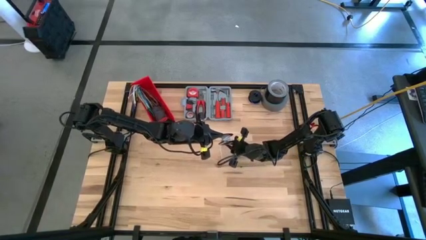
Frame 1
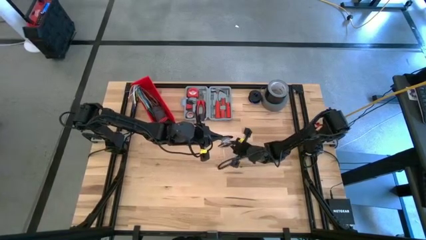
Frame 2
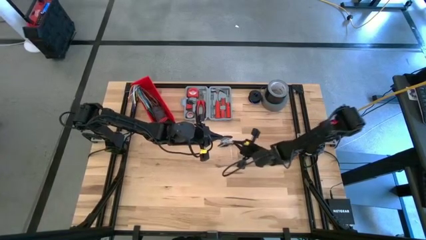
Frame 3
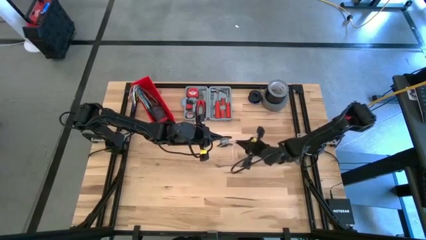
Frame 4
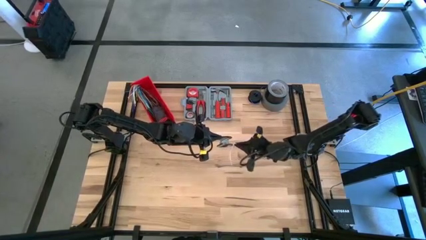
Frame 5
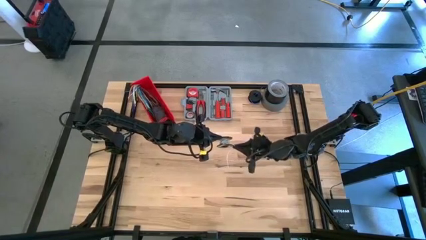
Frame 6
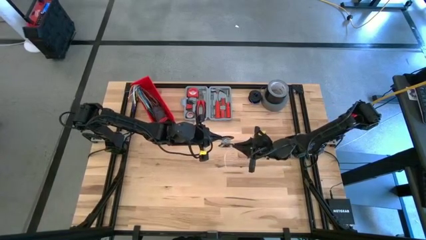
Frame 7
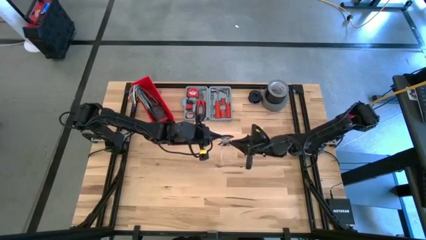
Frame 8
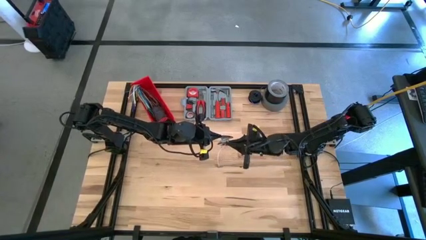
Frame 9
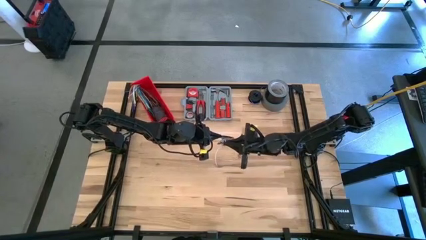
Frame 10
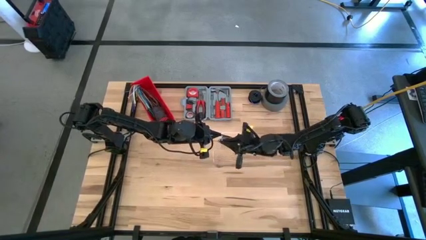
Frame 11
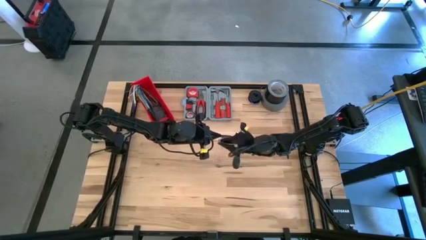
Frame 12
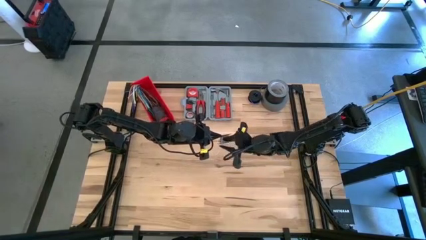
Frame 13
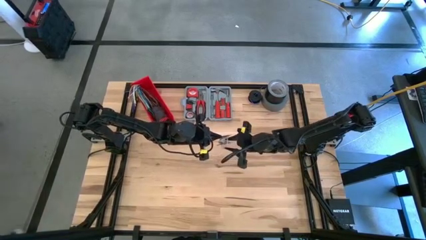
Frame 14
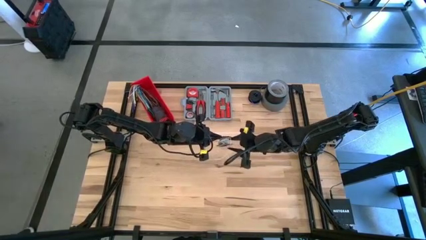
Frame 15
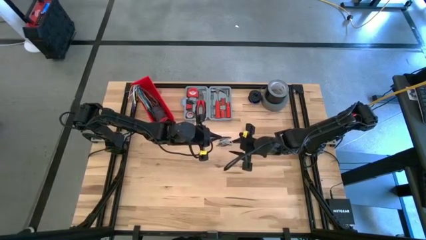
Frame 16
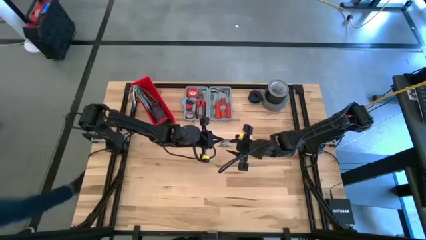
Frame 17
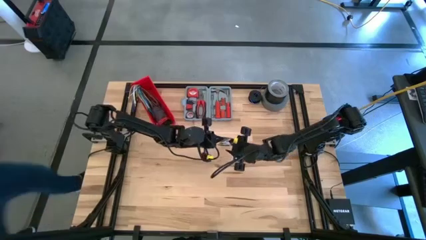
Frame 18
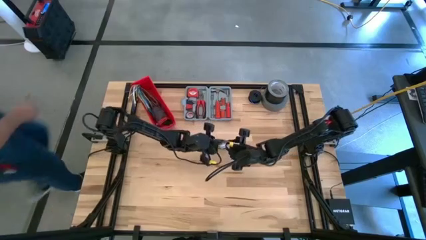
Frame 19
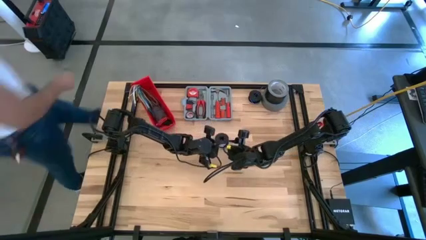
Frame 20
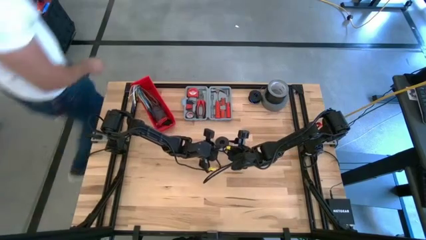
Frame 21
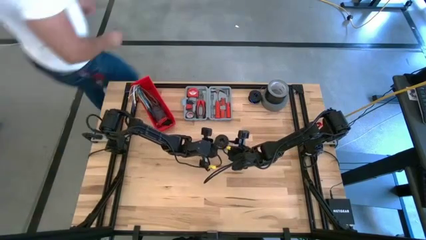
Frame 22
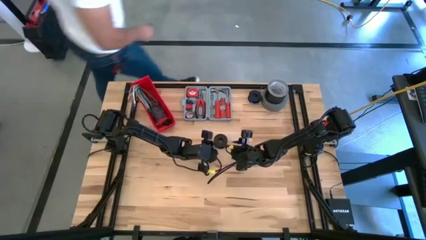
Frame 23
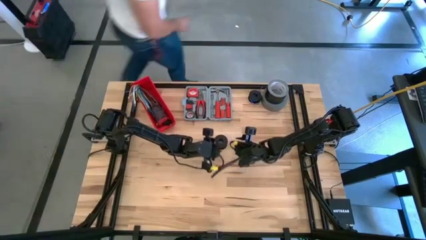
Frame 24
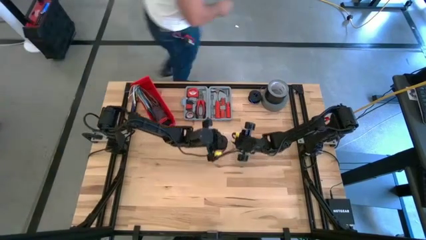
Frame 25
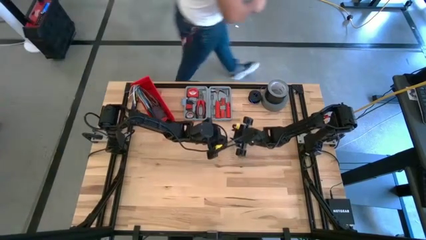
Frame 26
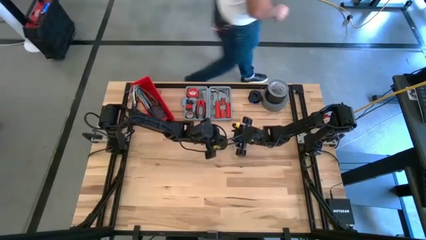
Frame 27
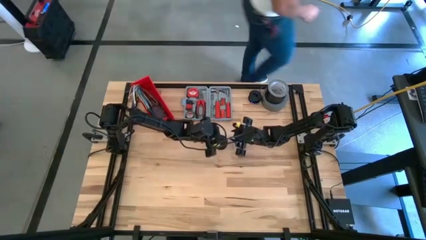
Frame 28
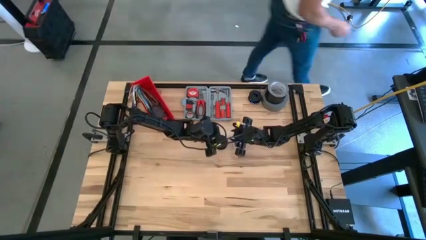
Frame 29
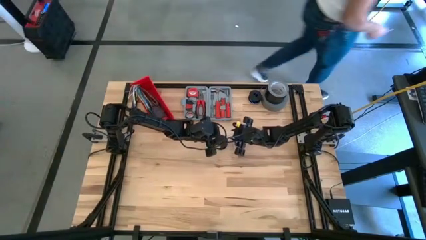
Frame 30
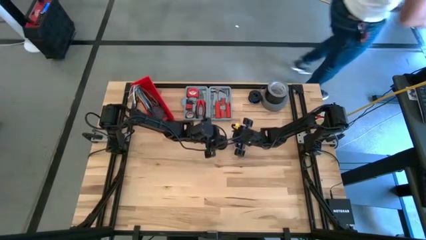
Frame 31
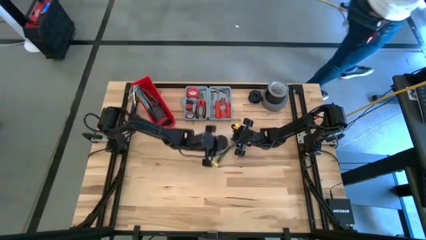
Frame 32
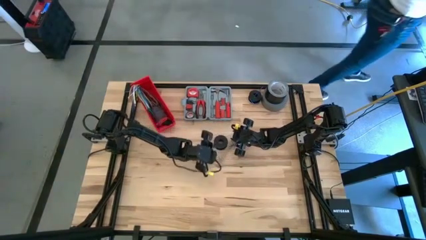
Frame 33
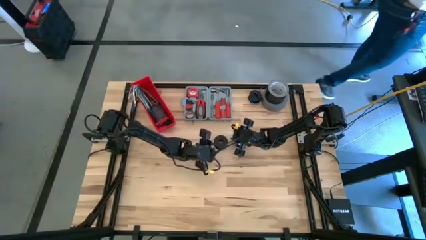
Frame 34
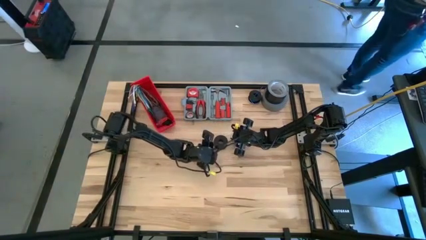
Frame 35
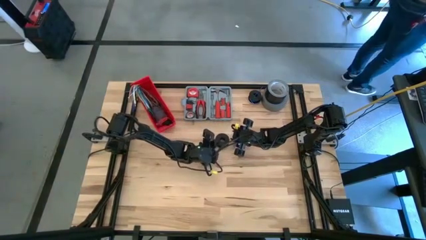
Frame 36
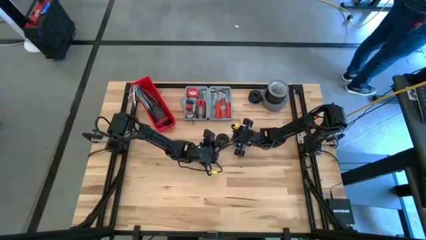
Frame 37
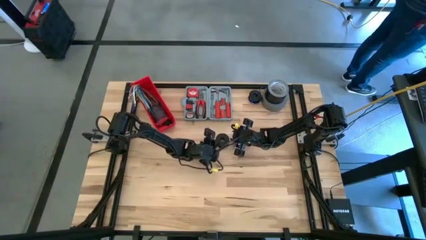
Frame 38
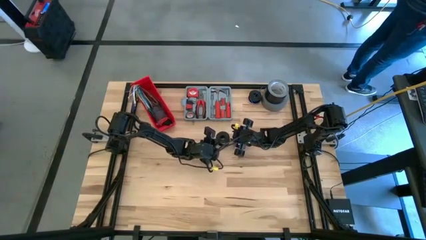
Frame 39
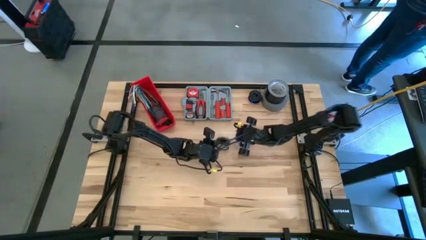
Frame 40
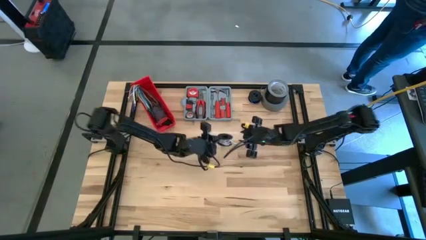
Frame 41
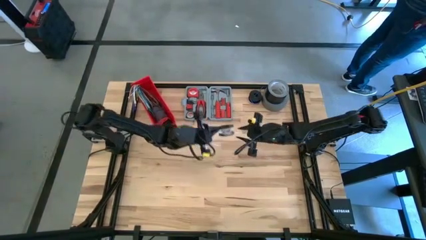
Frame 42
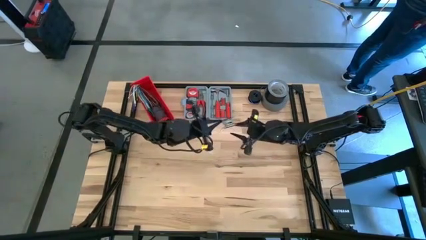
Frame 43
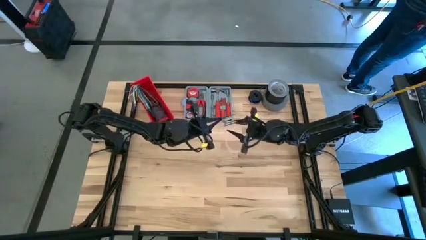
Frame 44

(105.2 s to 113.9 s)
Task: Coil cords
Coil the white wire into the spool

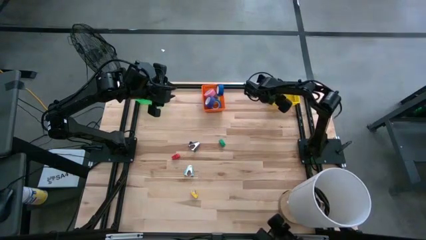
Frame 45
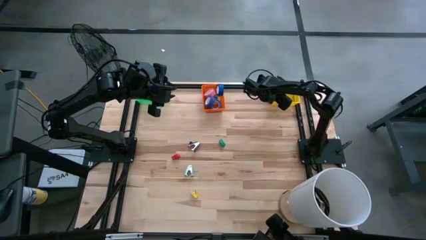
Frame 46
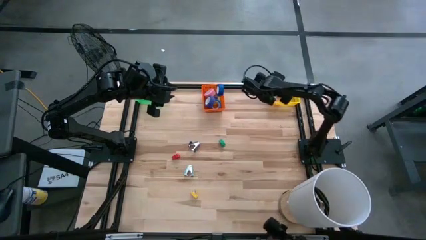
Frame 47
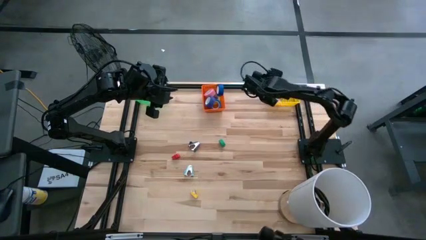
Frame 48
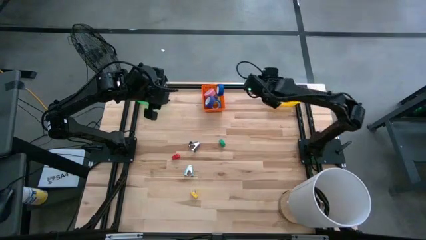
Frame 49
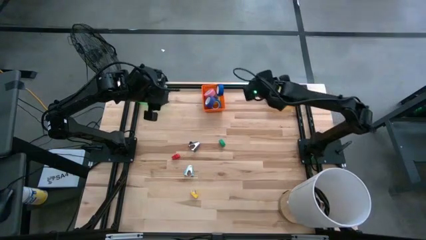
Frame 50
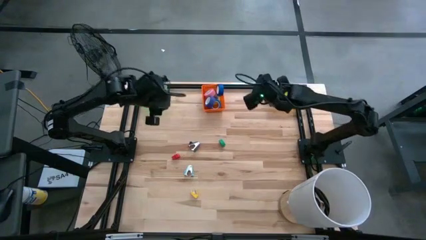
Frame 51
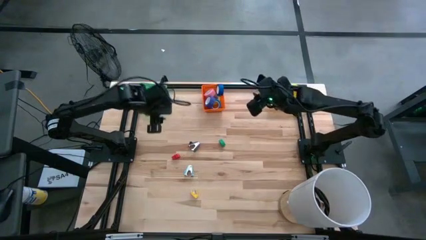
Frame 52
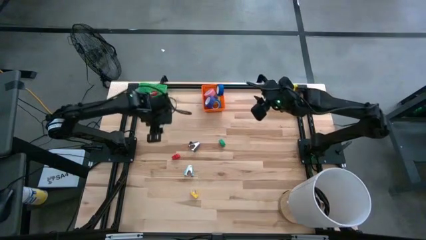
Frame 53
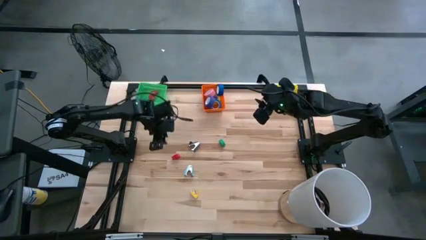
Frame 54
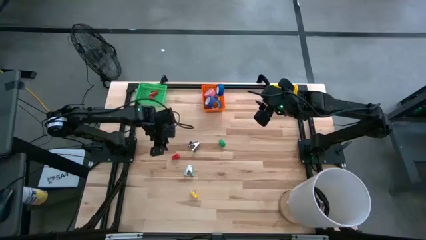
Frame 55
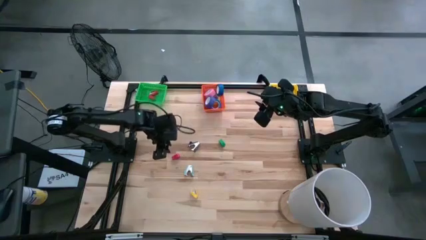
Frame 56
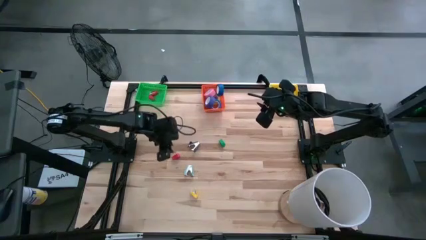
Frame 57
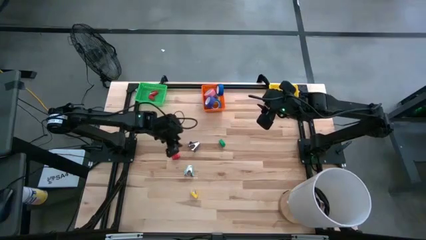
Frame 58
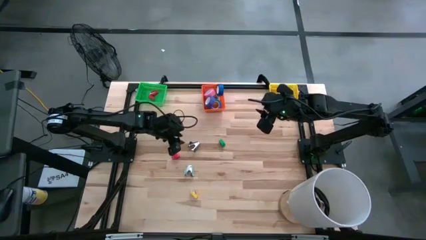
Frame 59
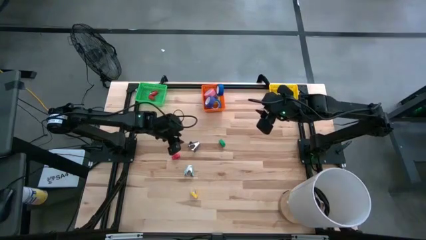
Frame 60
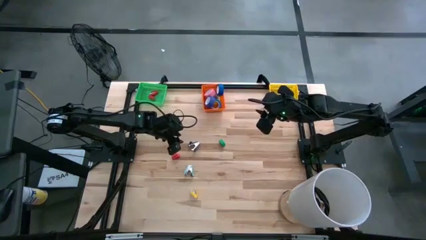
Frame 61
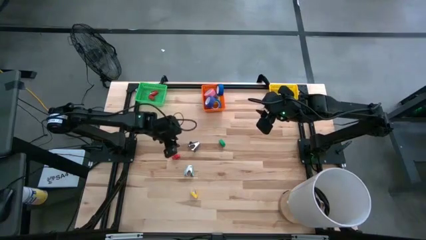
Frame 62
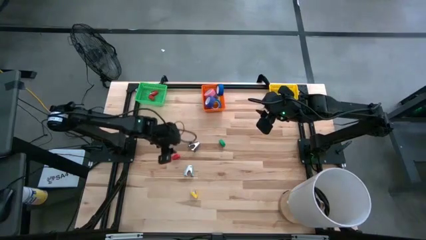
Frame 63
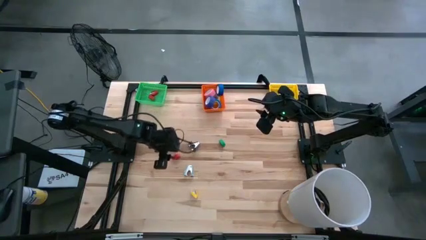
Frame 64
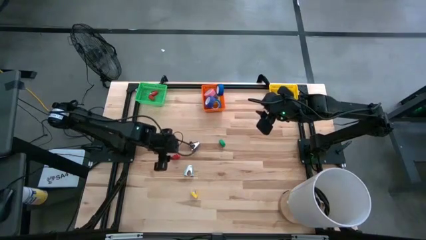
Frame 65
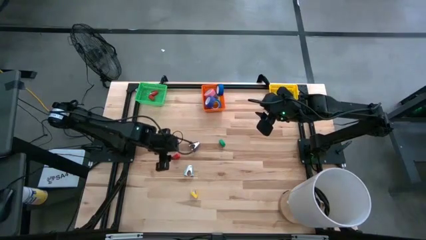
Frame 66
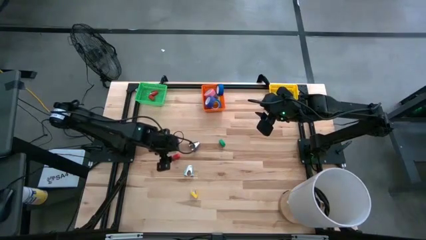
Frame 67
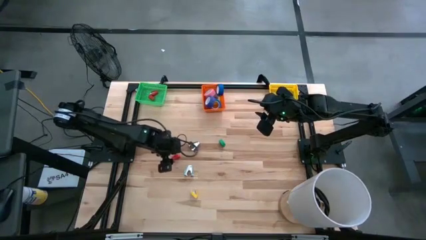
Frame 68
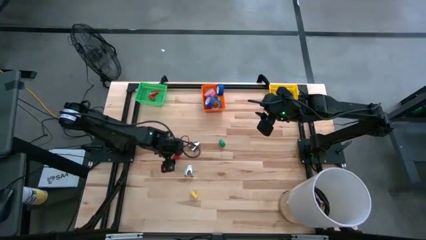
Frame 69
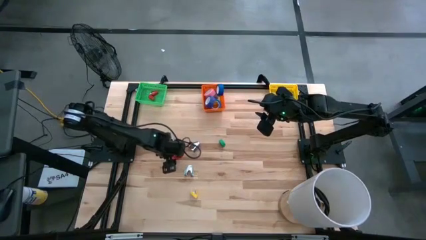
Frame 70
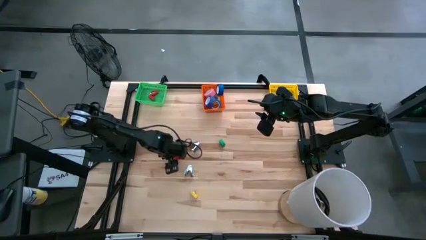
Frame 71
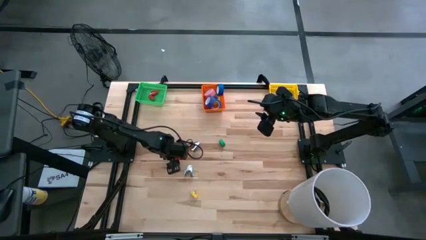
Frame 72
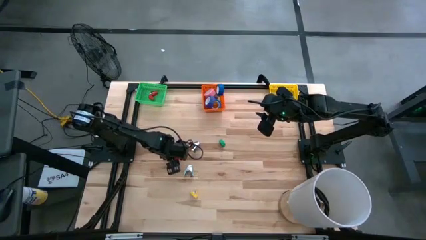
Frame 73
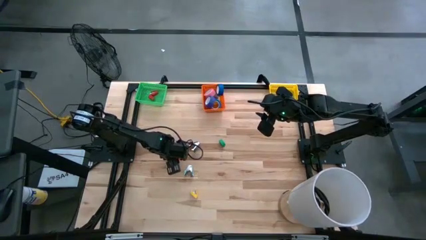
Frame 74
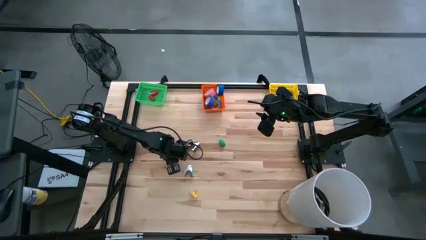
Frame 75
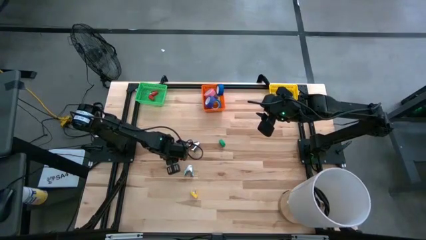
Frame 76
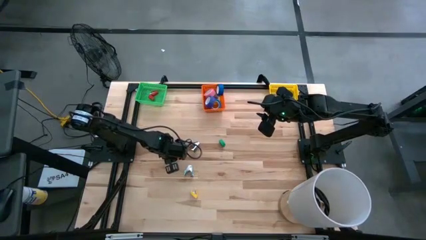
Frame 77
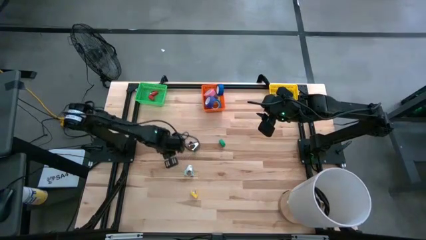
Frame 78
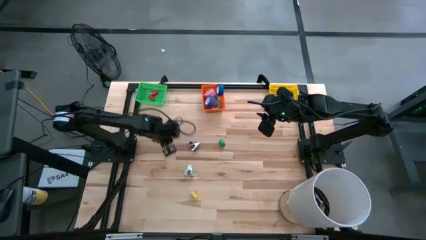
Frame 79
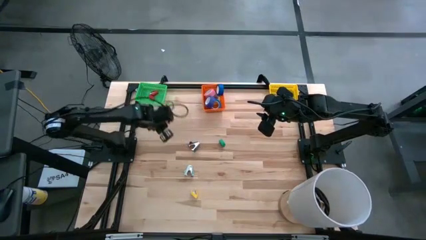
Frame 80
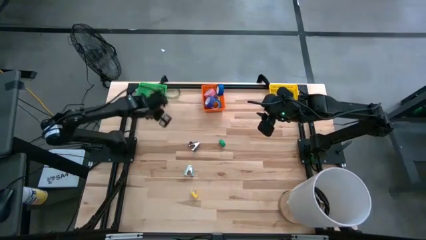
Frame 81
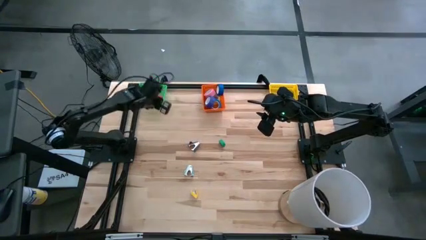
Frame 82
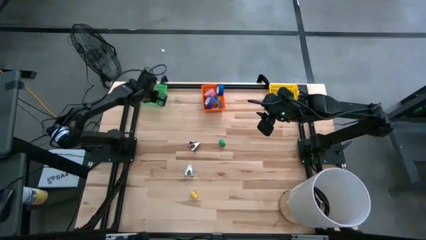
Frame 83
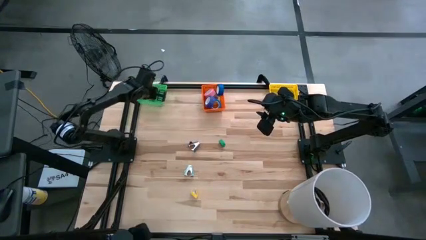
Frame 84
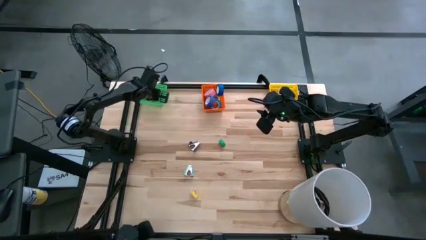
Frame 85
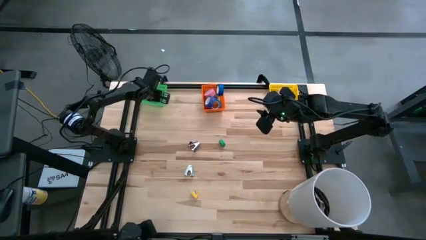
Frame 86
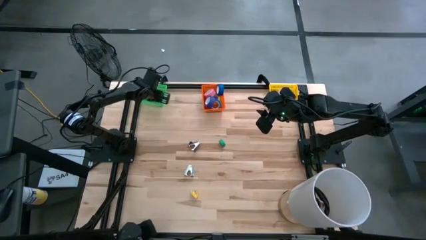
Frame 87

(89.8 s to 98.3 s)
Task: Pick and place Stapler, Stapler remover, tape
Put the red stapler into the green bin
